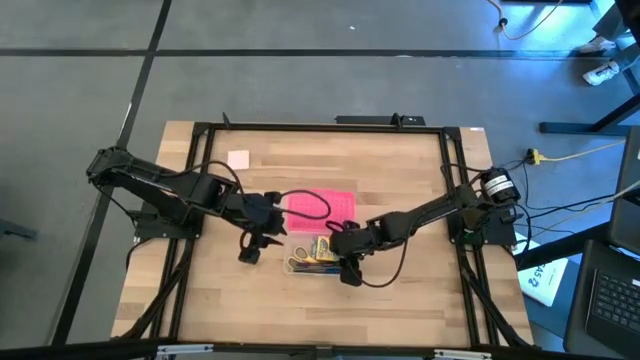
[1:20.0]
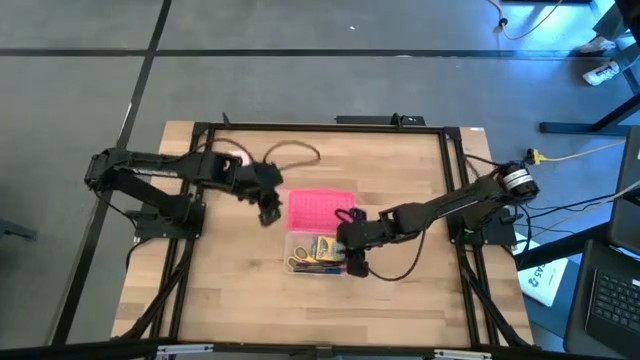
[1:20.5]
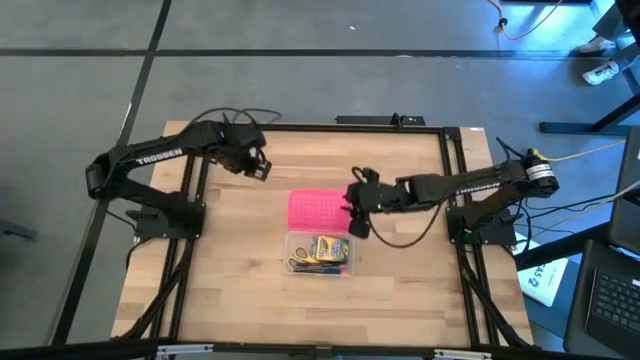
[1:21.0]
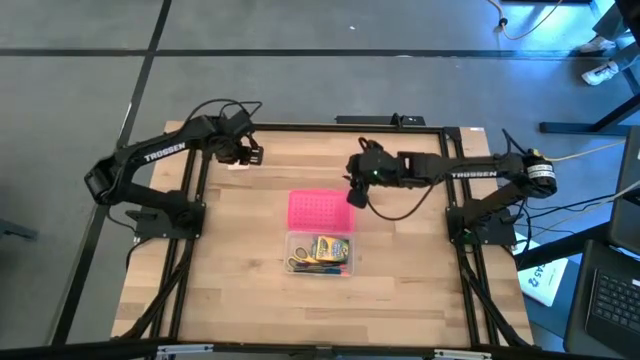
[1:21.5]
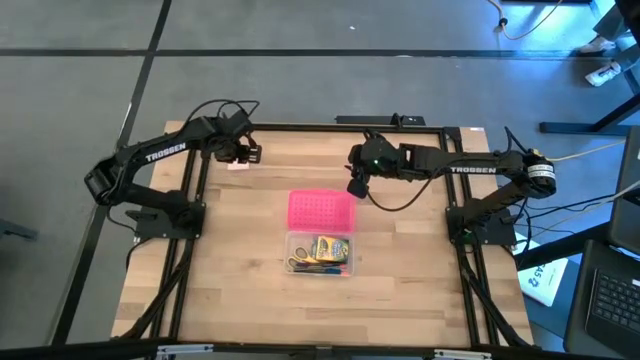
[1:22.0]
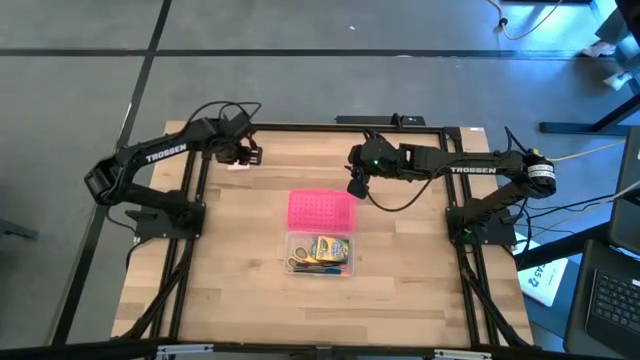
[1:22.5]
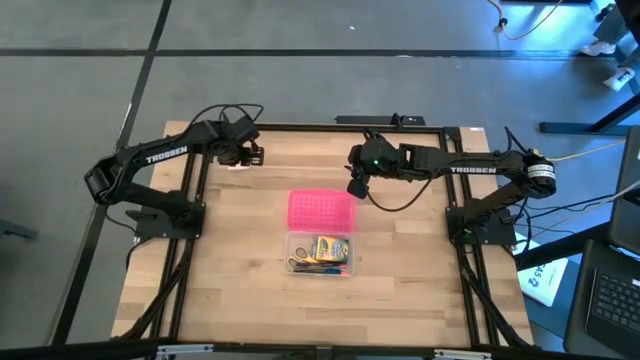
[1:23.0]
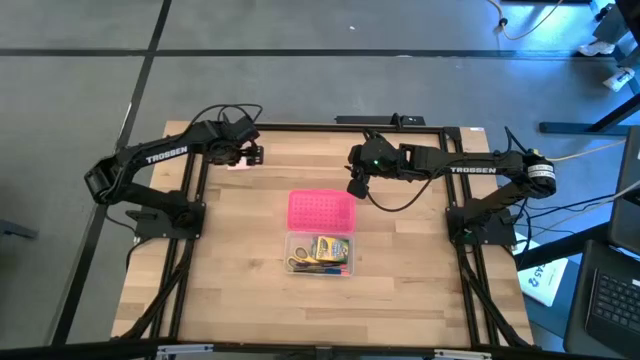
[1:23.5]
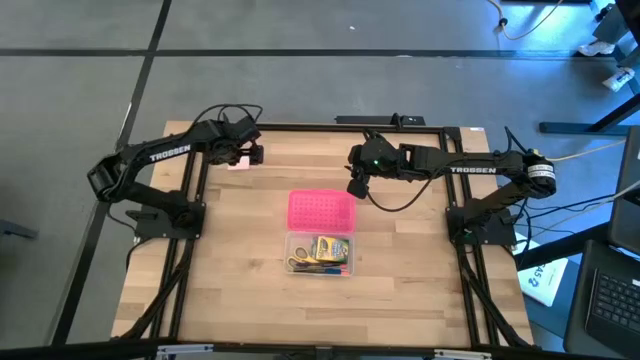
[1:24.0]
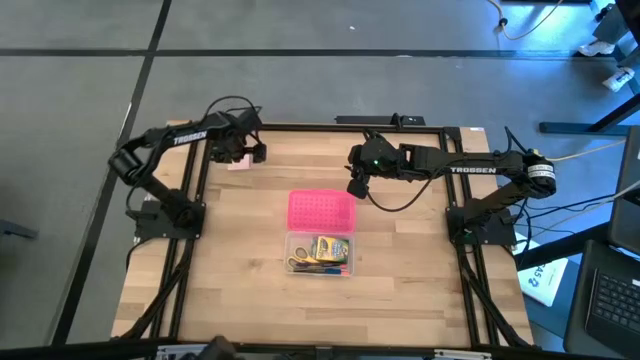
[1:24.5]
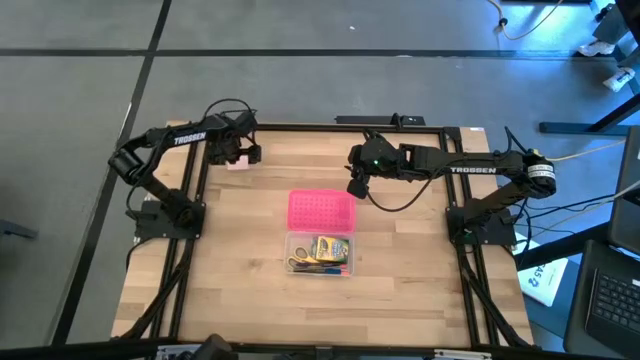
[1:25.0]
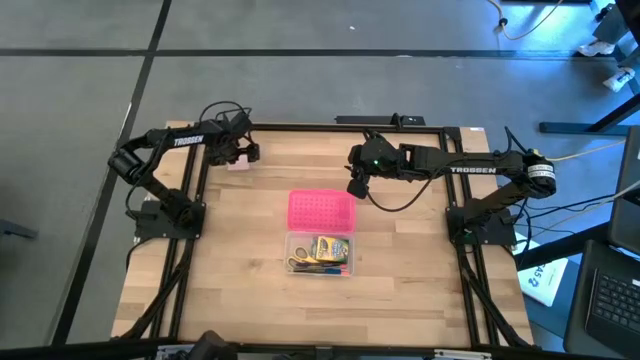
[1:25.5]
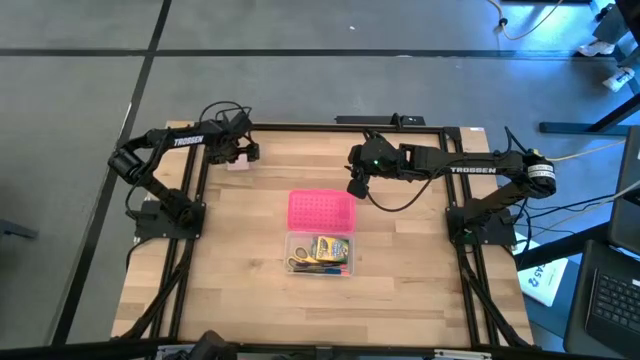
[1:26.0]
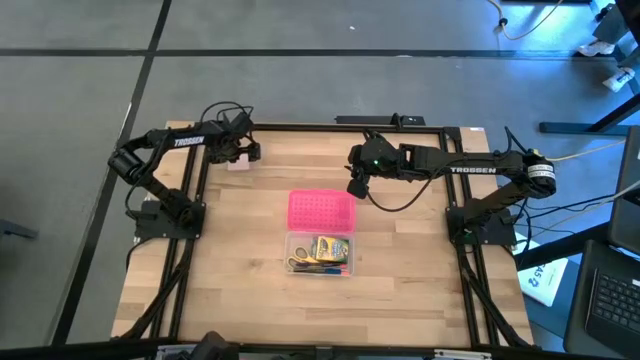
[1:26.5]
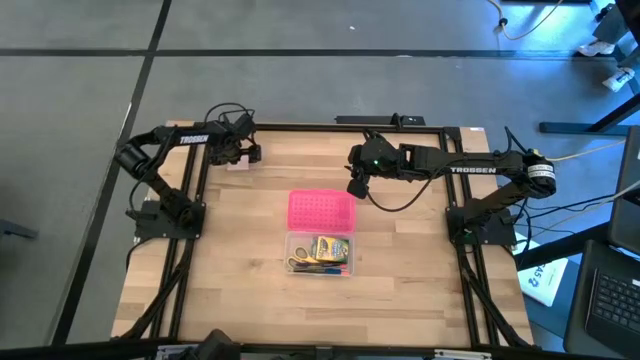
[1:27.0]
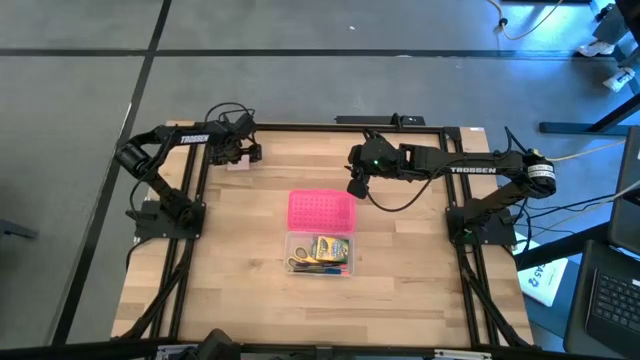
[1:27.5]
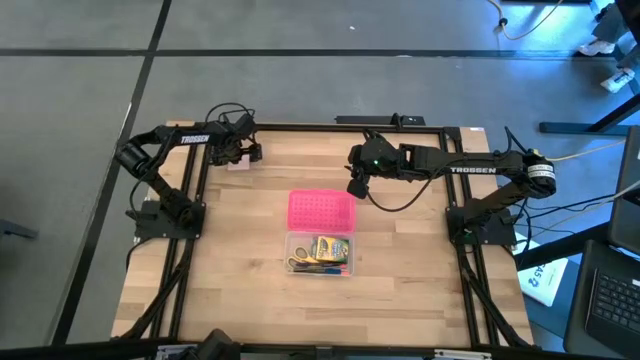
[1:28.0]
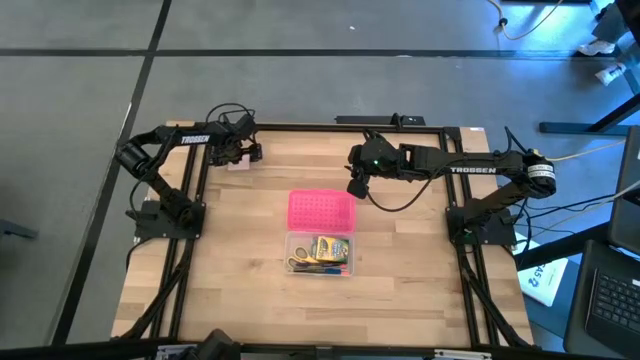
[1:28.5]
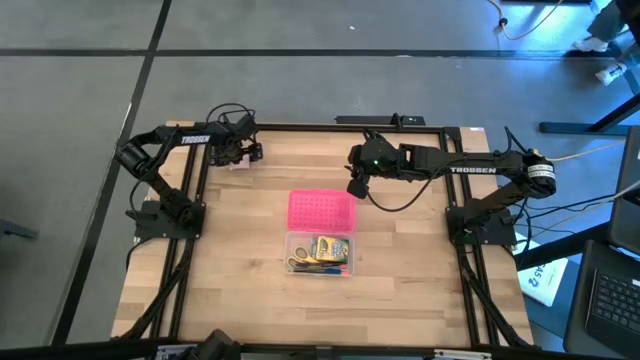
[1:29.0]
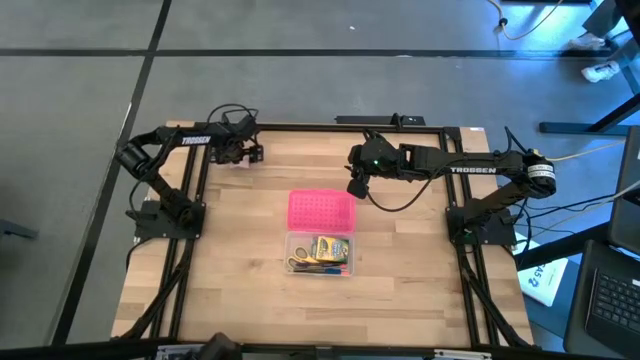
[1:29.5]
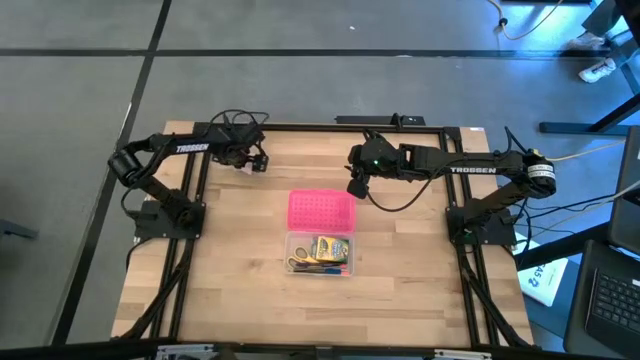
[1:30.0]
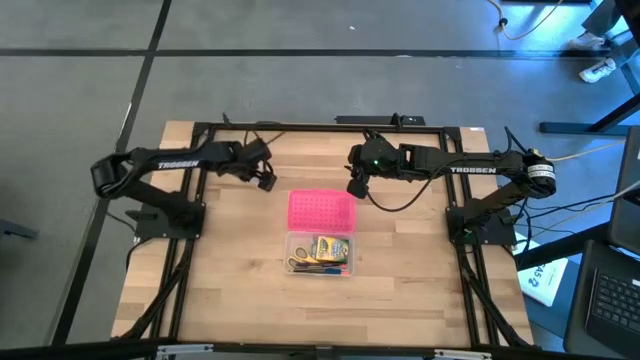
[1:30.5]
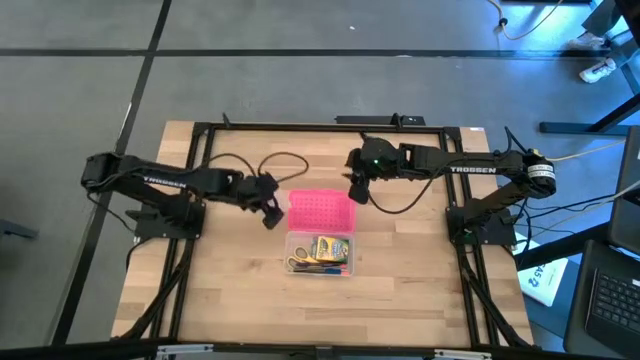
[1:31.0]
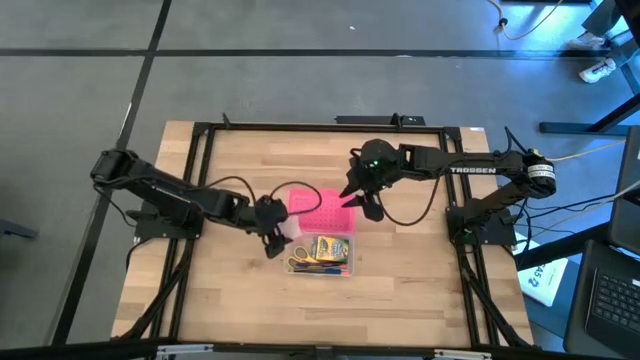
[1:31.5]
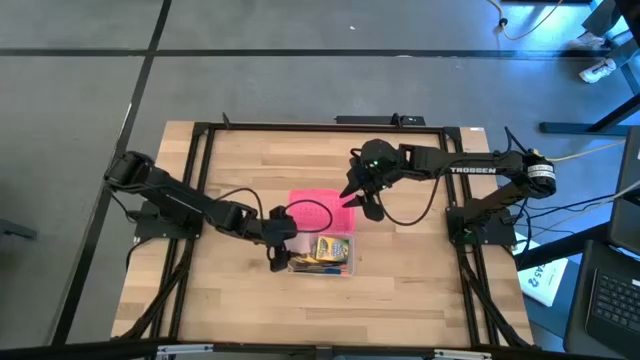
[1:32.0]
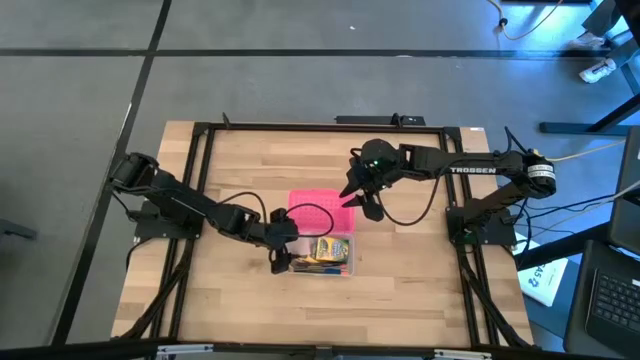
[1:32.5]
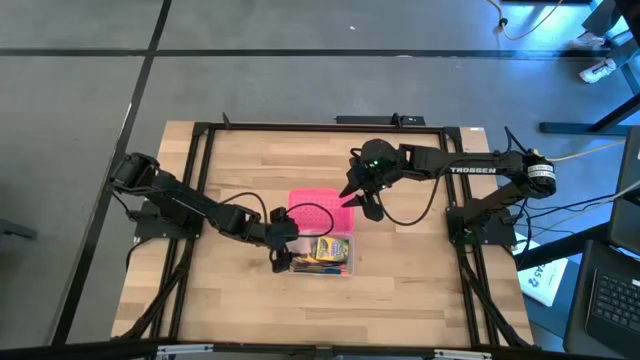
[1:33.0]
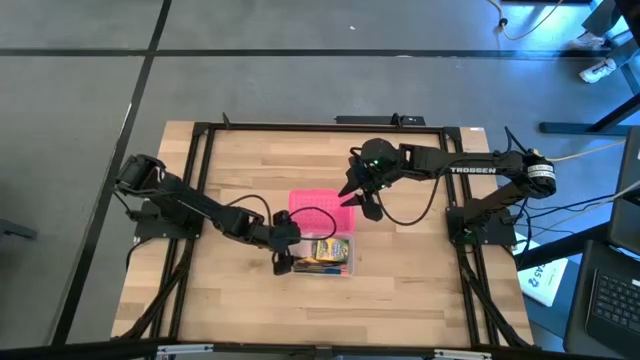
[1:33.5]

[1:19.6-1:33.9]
Task: Pack school essentials
Put the pink sticky notes into the pink supply box

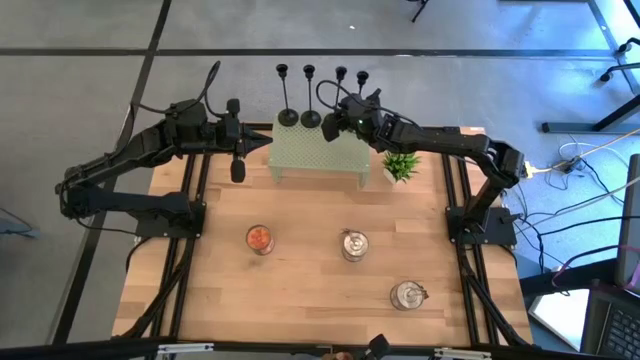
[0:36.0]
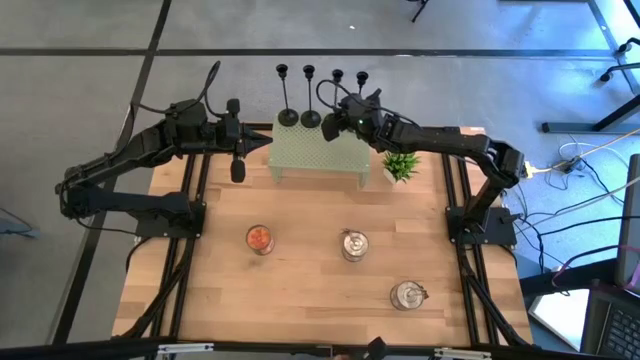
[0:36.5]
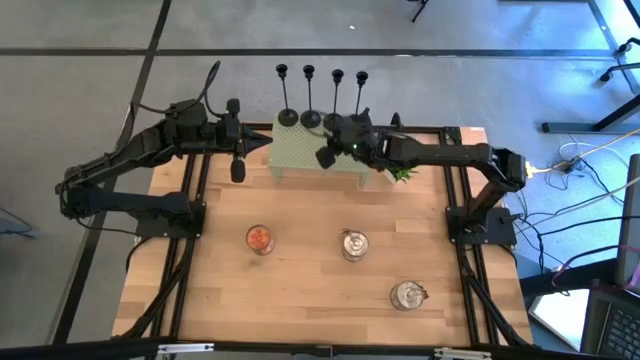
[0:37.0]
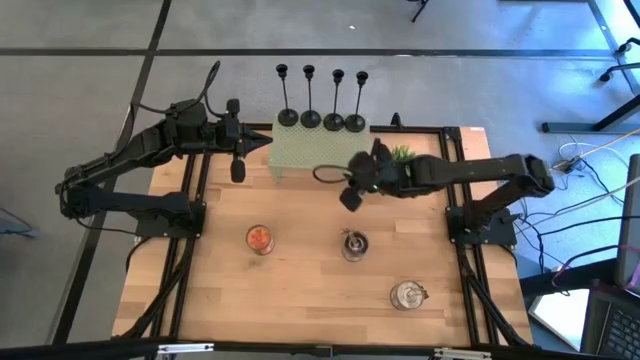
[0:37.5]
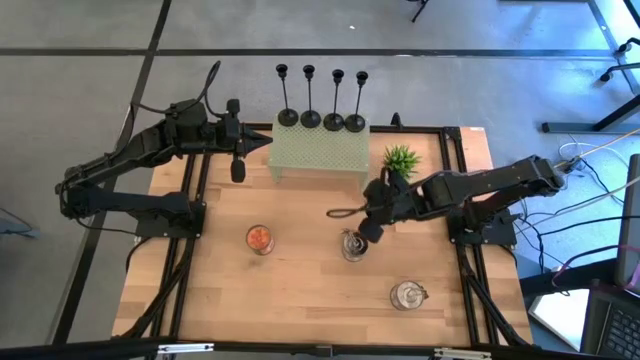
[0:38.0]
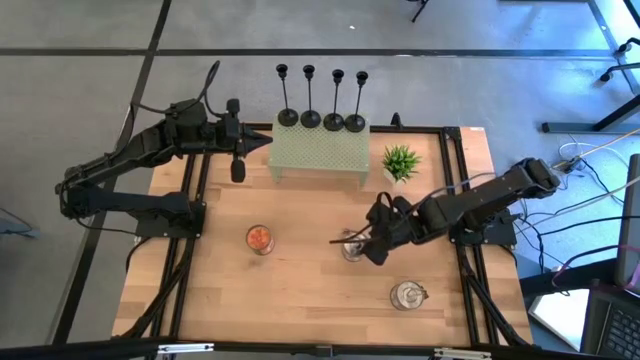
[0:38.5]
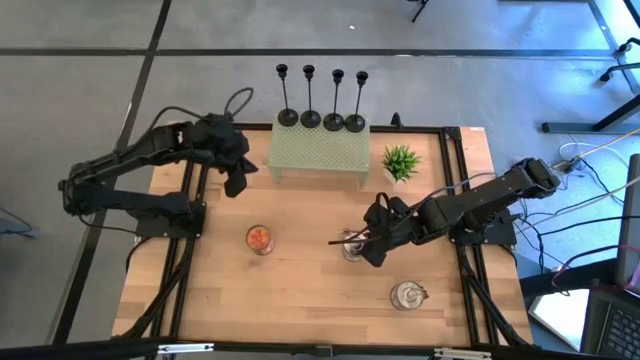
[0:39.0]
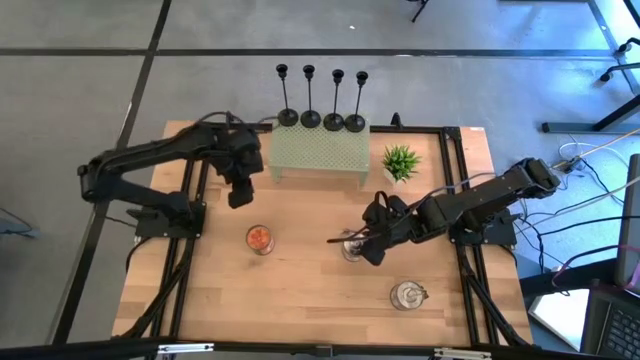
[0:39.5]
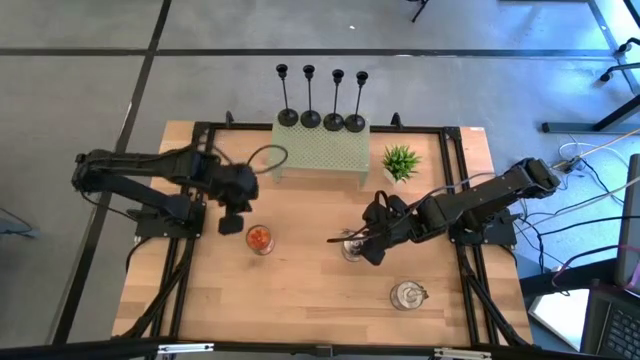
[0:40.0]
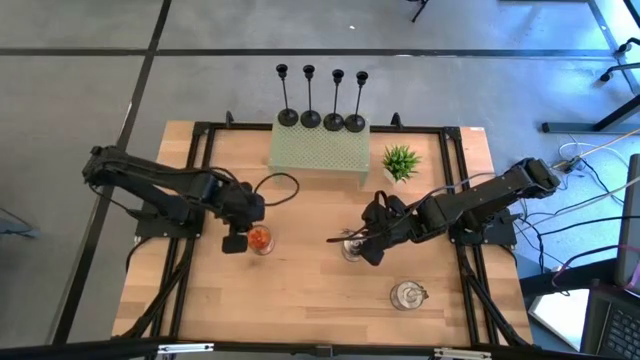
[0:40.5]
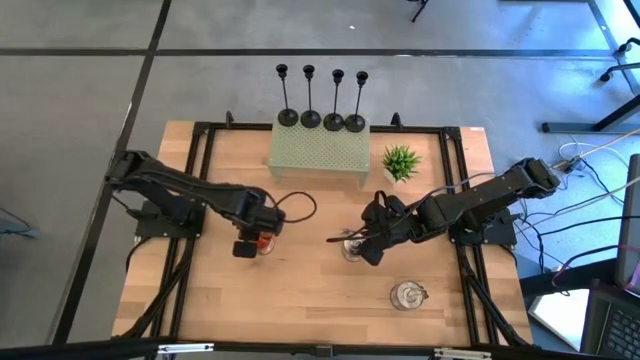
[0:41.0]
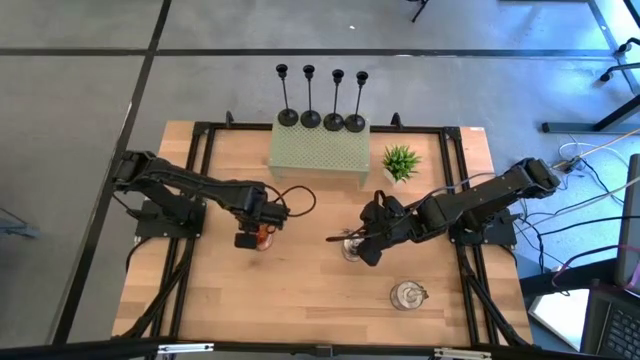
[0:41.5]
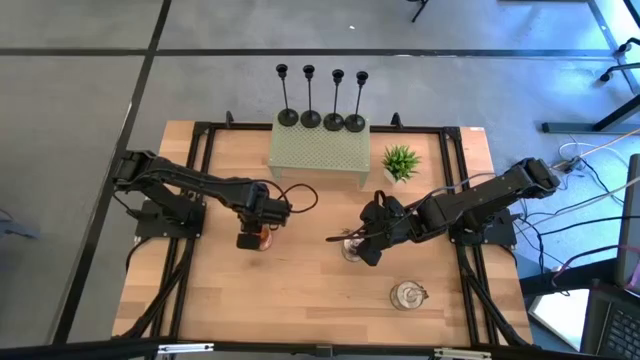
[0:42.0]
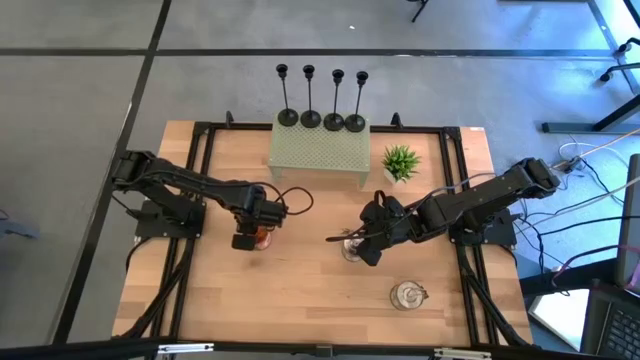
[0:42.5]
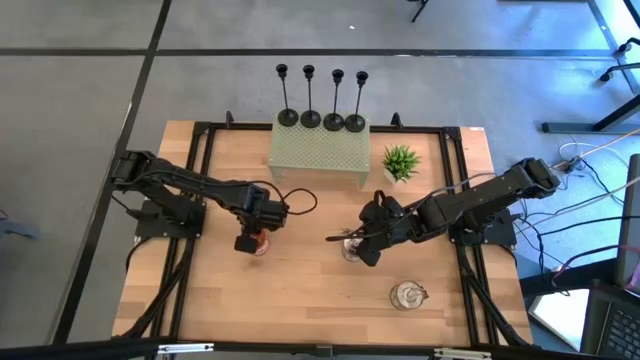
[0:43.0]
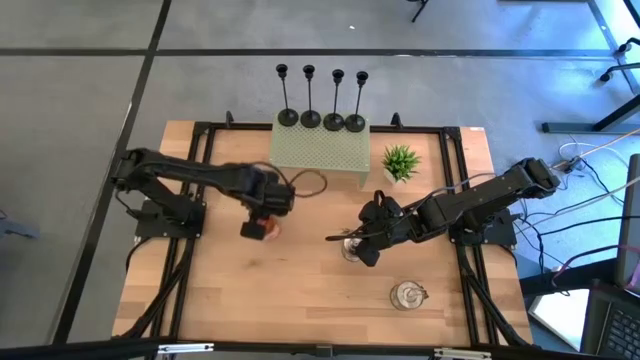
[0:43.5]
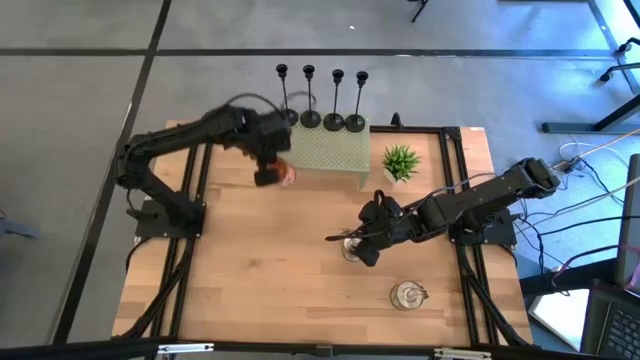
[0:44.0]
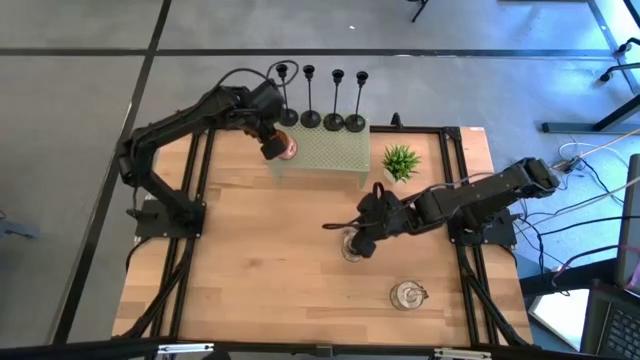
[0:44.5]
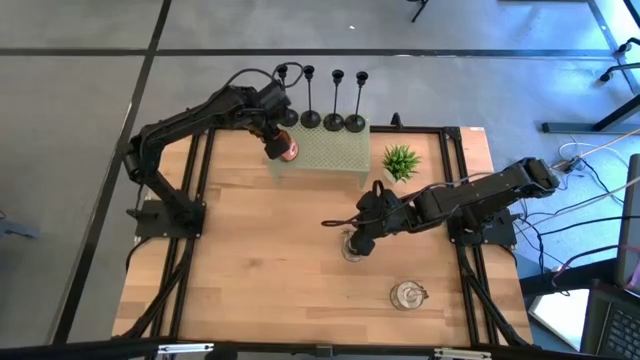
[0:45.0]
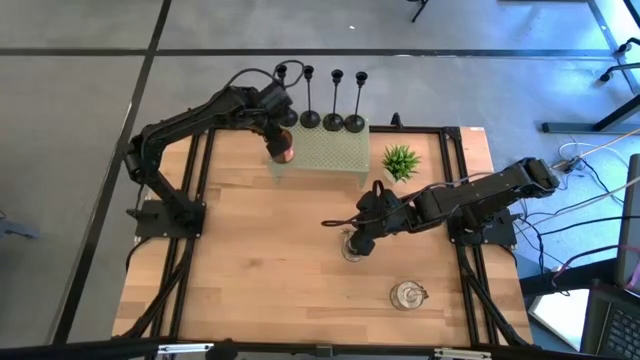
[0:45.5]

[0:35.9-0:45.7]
Task: Pick & Place candle stick holders
Put the top left candle on the shelf
